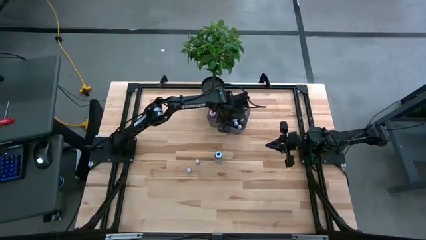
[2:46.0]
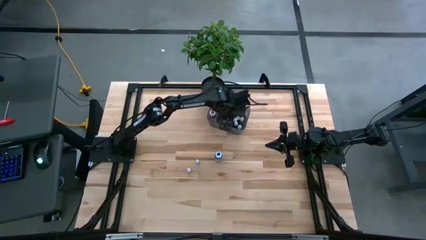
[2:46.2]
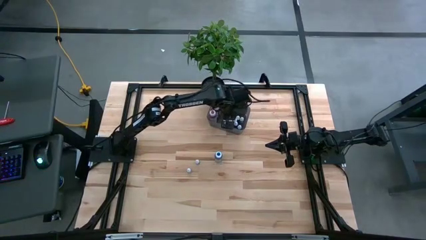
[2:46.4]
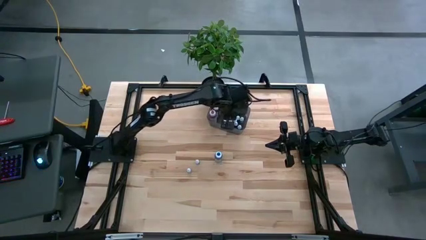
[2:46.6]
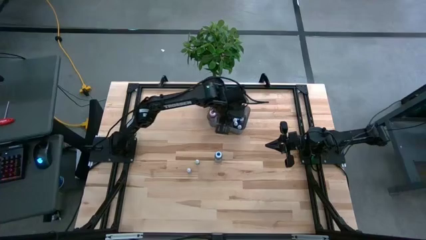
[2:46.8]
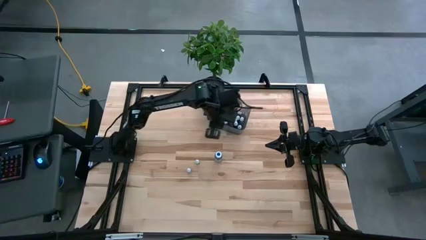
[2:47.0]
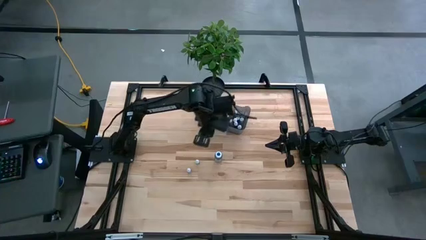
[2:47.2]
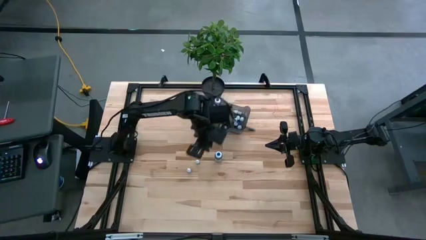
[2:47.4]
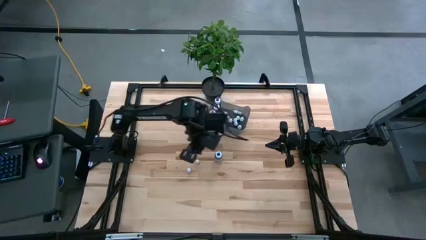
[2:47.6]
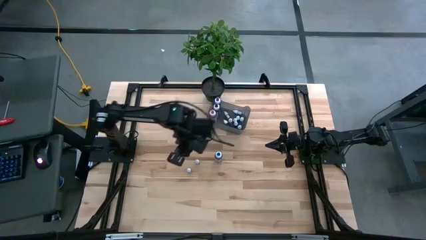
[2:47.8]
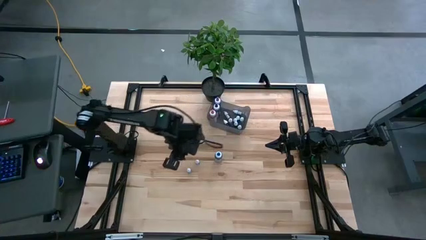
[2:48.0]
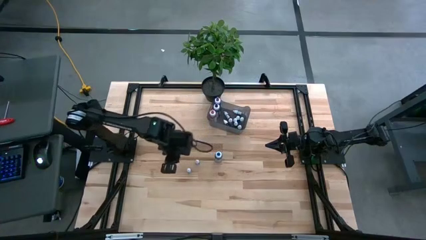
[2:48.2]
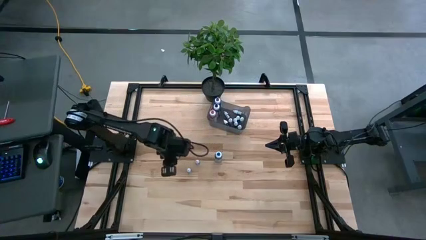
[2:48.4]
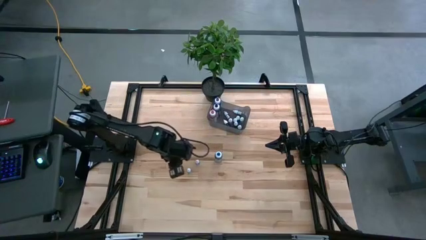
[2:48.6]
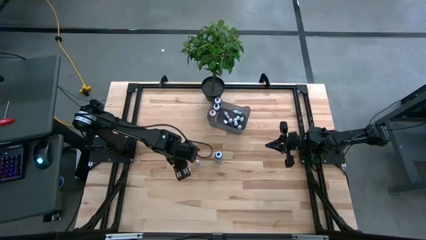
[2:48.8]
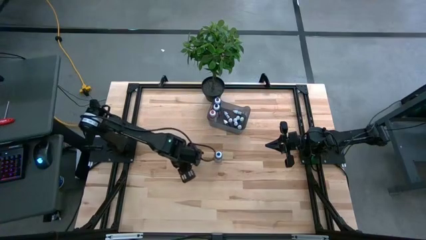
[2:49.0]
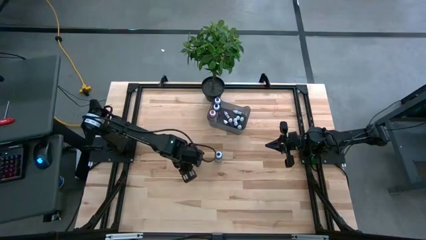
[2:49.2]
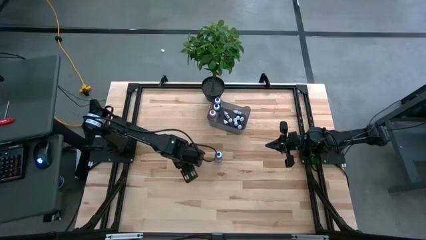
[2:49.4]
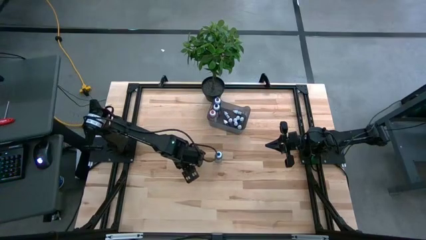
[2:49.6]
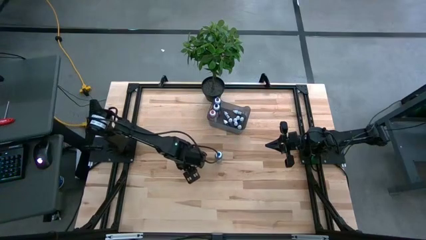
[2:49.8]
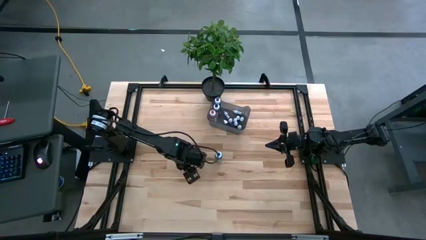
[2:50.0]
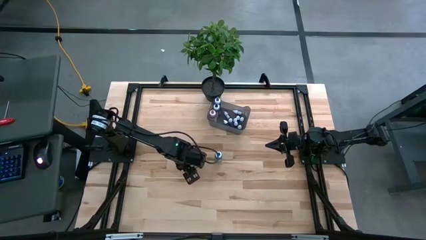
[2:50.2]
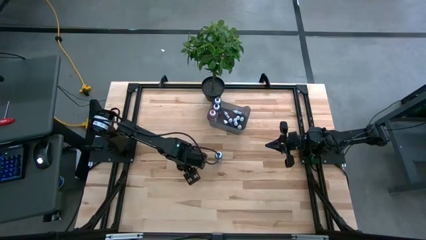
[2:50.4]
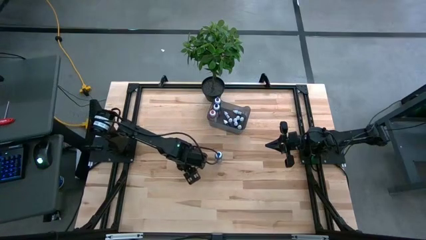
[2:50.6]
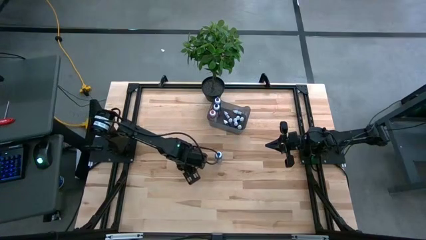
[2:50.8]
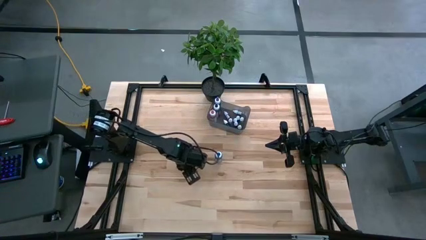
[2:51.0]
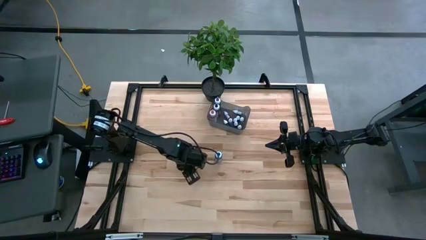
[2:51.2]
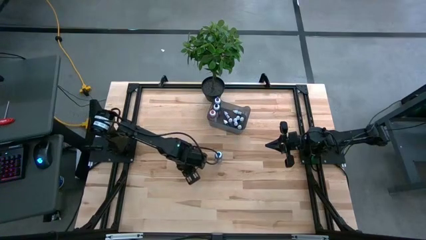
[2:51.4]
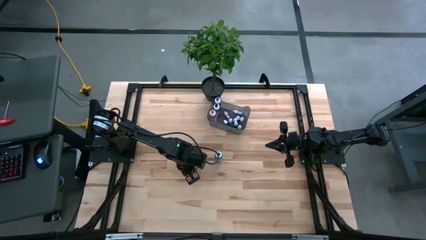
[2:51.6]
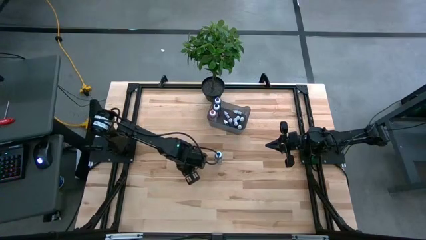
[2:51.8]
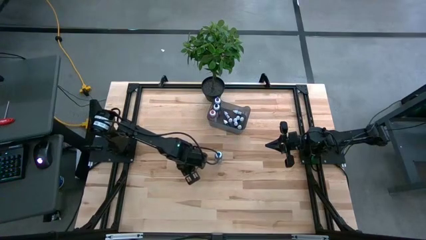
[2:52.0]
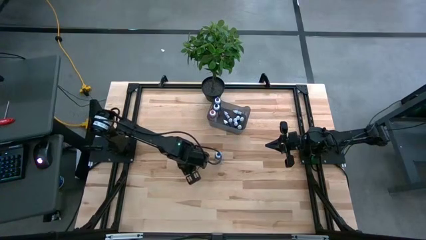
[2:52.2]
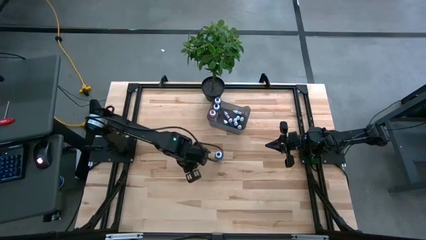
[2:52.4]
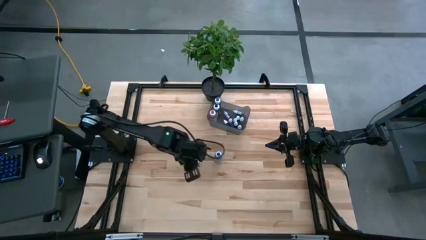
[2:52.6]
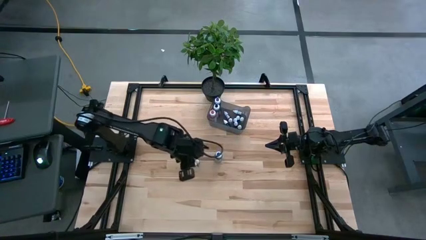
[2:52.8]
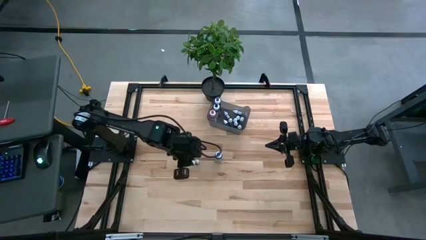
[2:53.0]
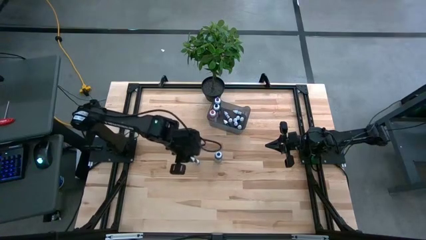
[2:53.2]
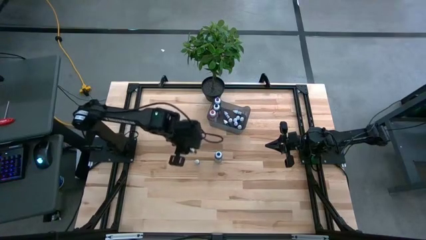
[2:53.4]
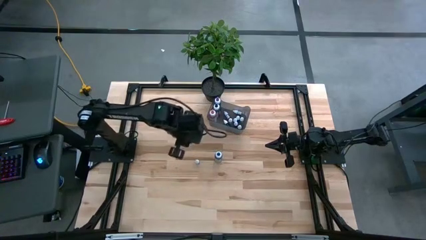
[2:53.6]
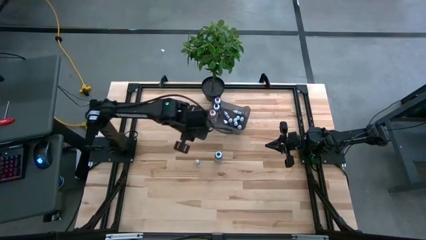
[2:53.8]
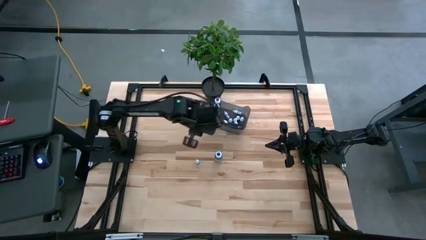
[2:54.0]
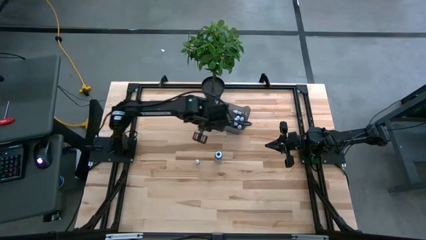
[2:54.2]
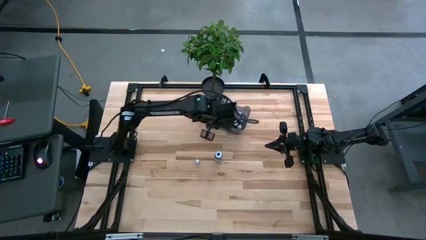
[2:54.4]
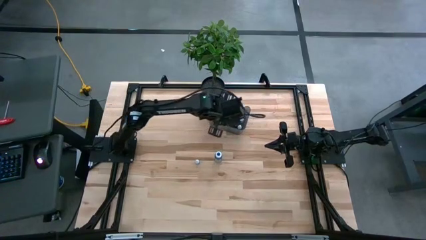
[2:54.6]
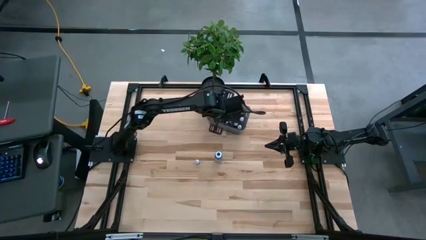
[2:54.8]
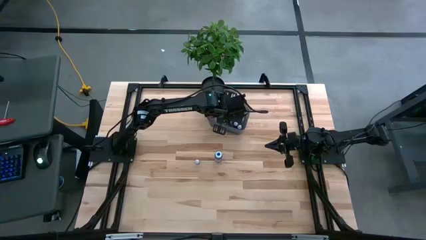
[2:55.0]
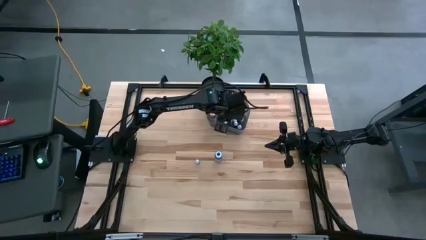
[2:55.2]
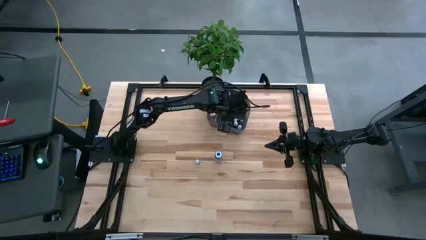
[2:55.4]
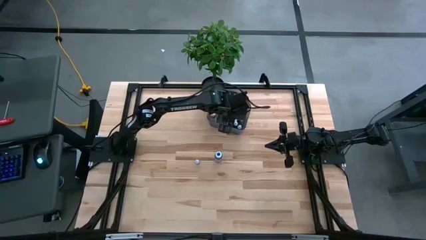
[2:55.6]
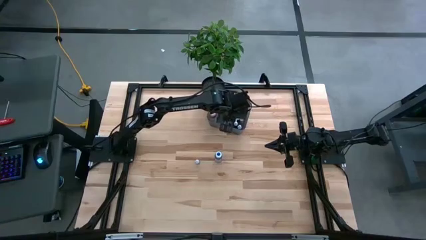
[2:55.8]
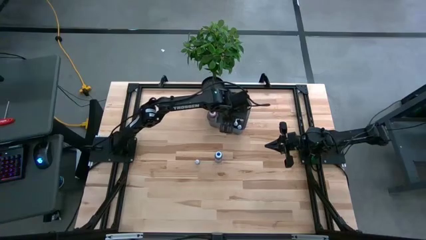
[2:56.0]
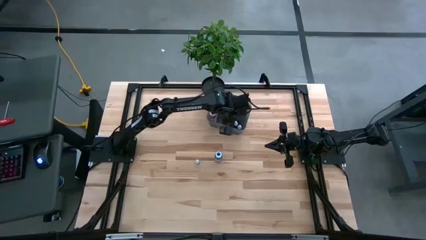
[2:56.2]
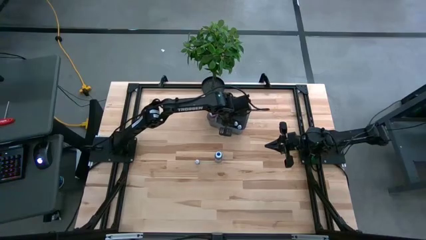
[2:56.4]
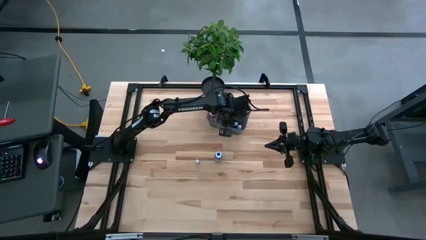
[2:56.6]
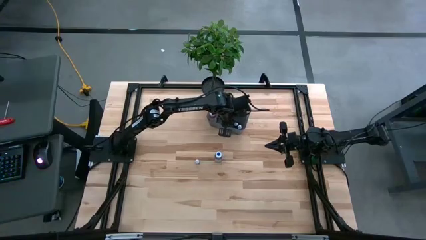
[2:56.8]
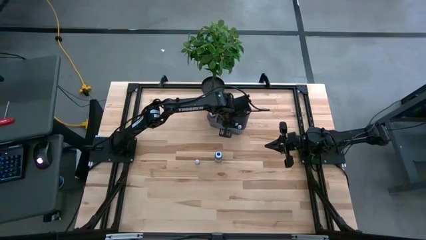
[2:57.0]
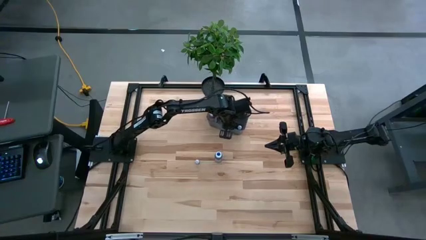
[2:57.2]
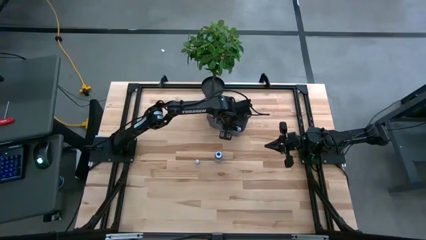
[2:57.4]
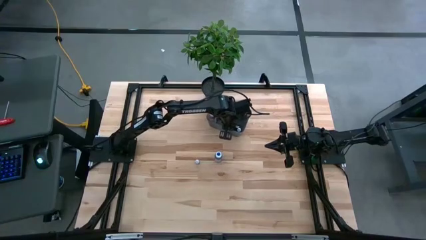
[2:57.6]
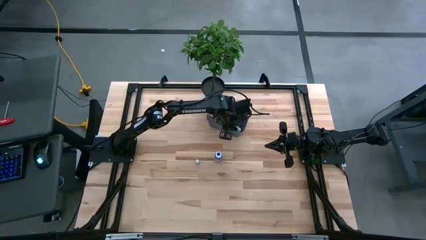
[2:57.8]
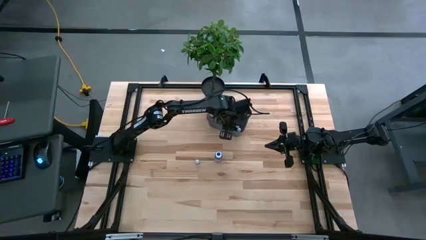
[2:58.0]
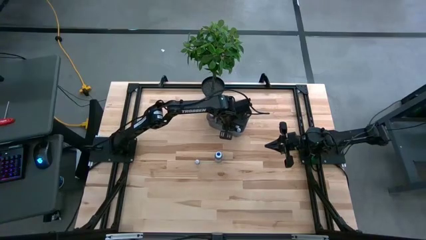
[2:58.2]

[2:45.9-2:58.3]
Task: Pick & Place food coloring
Put the small black food coloring bottle into the black bin

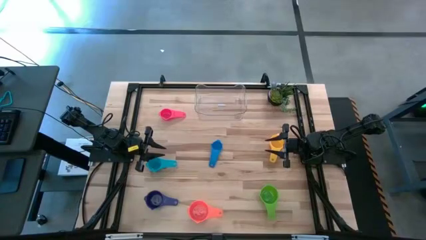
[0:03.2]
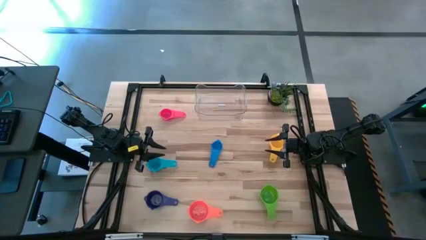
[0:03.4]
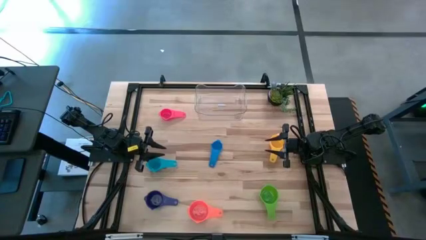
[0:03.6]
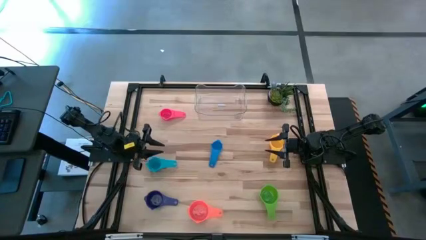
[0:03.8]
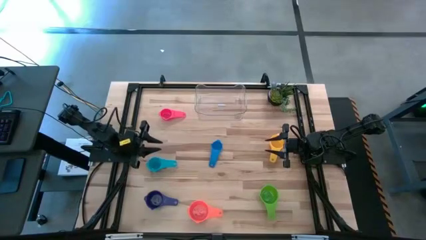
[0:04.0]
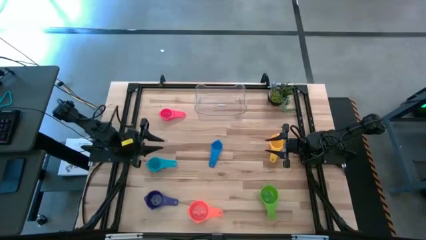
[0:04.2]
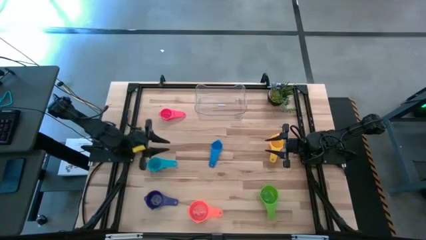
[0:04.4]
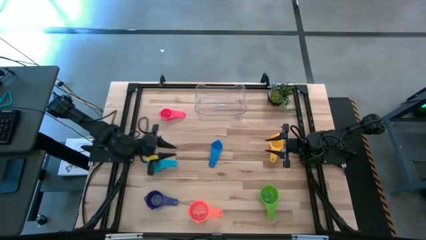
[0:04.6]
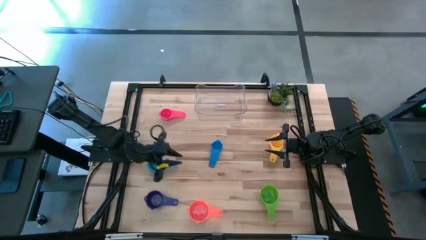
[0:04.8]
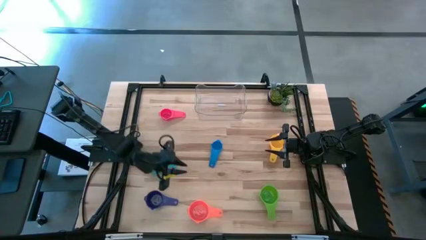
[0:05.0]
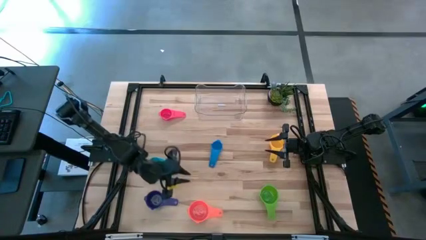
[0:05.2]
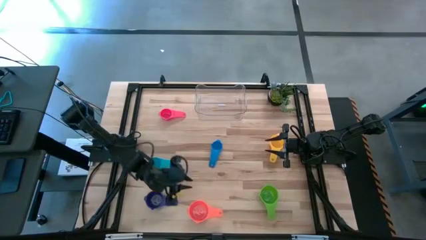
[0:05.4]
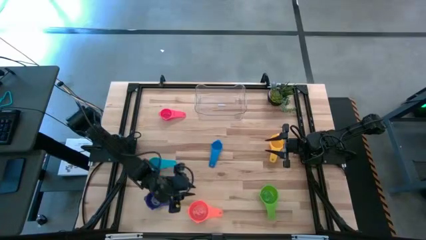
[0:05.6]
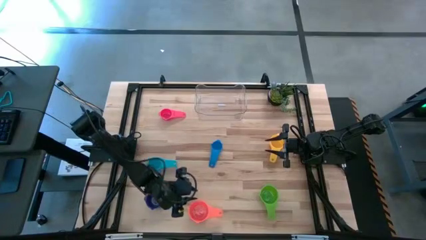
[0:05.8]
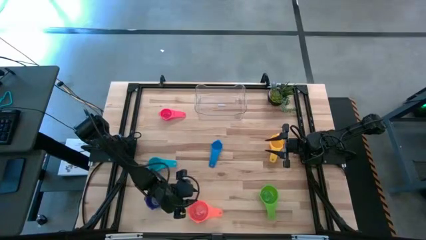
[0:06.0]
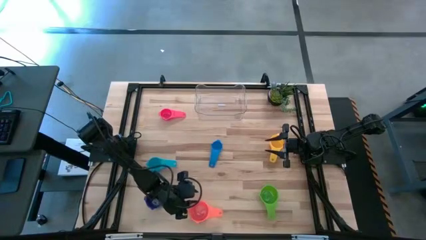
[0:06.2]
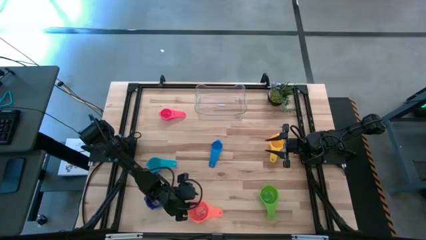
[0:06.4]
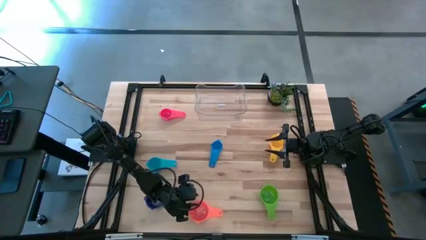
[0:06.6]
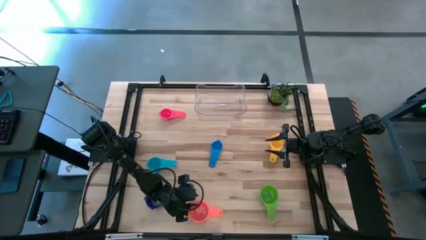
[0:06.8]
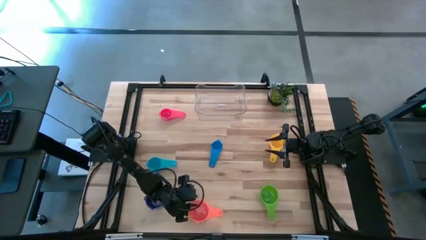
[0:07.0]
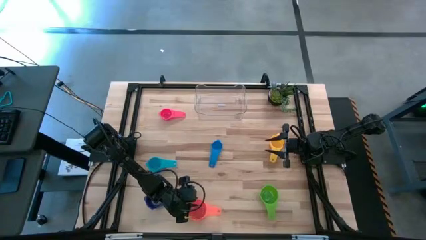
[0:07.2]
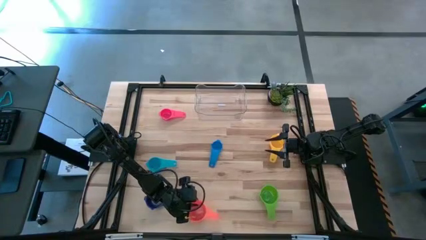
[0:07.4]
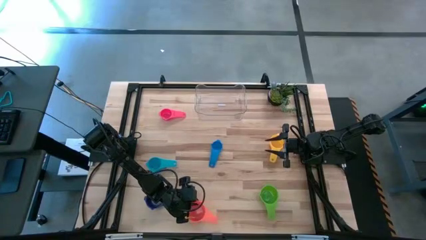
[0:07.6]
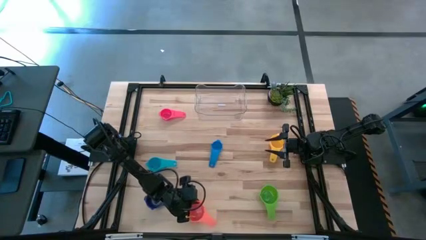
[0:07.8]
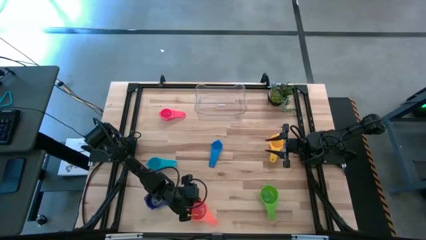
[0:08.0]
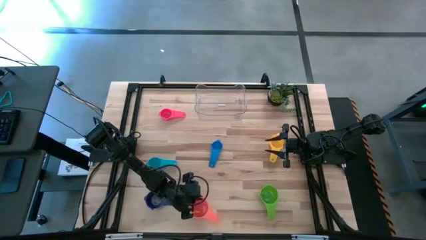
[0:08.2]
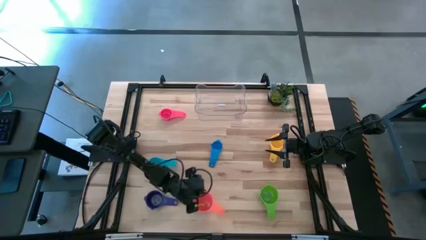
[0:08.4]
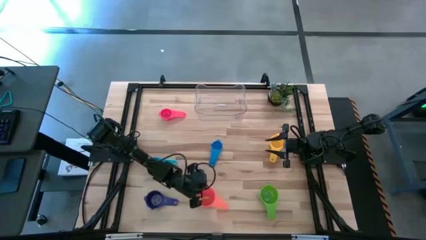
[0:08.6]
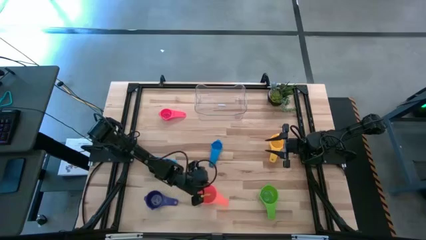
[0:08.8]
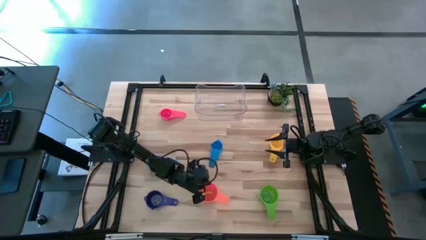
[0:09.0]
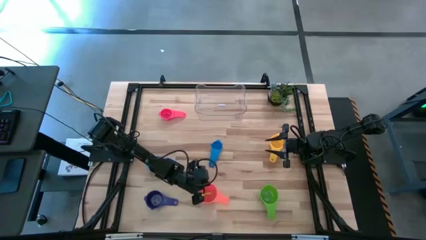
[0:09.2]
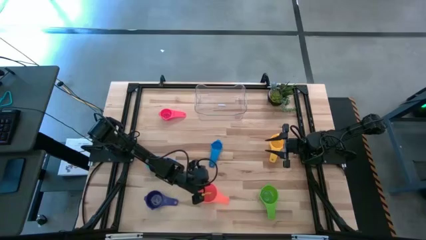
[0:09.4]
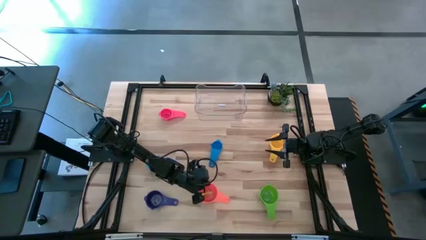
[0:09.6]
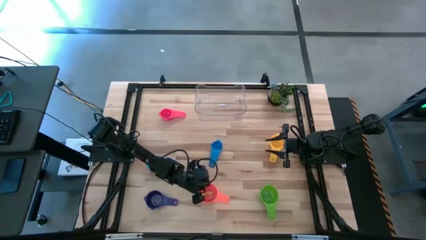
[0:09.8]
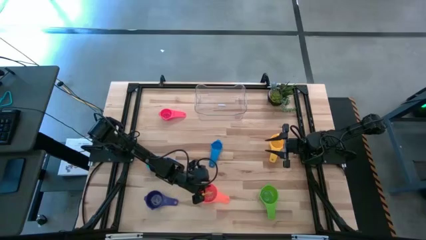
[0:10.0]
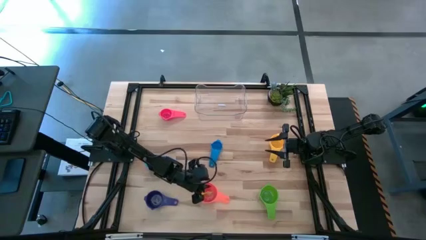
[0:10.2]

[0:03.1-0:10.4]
Task: Nest measuring cups in basket
Move the orange measuring cup to the table bottom center
